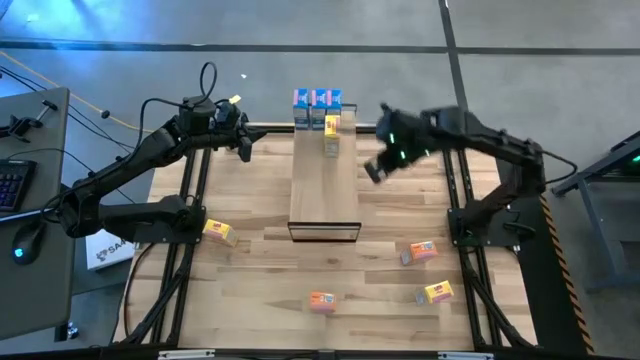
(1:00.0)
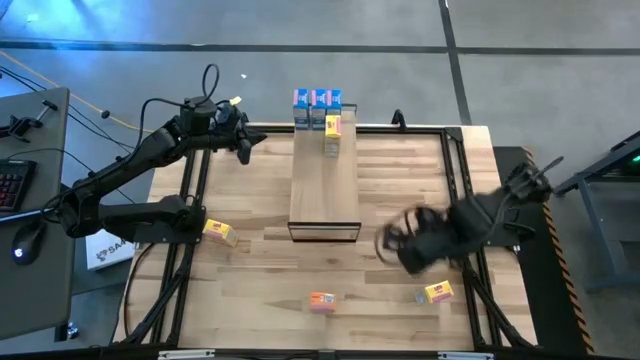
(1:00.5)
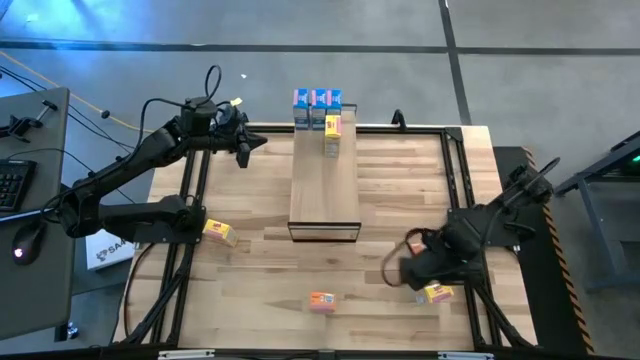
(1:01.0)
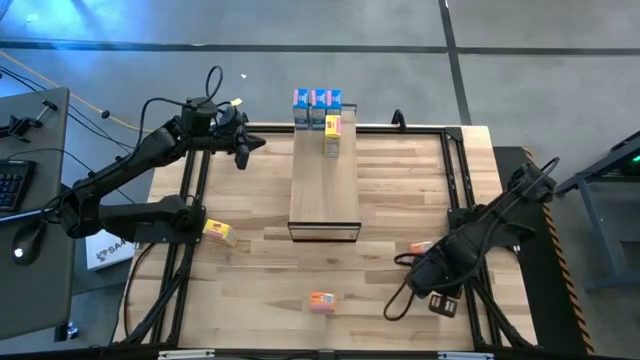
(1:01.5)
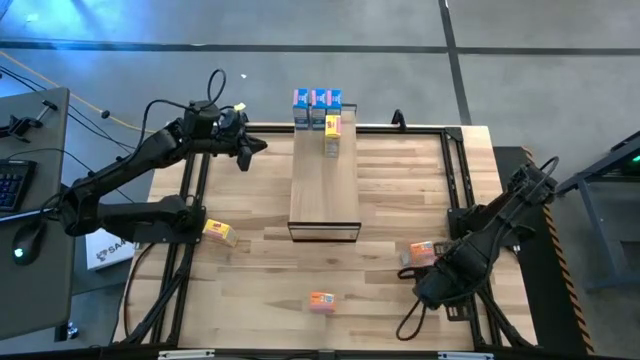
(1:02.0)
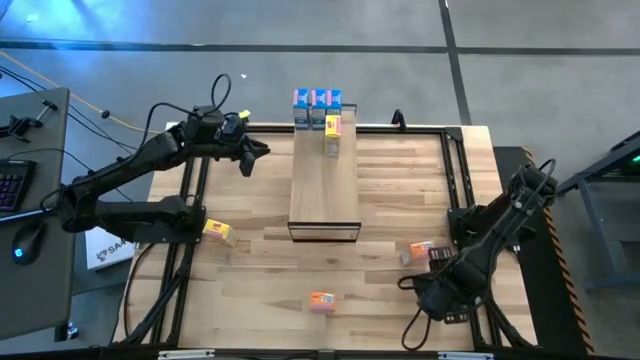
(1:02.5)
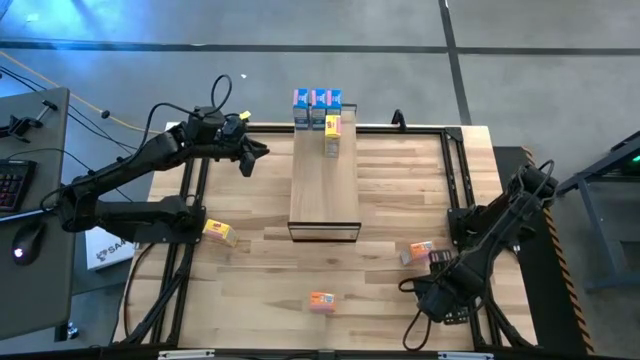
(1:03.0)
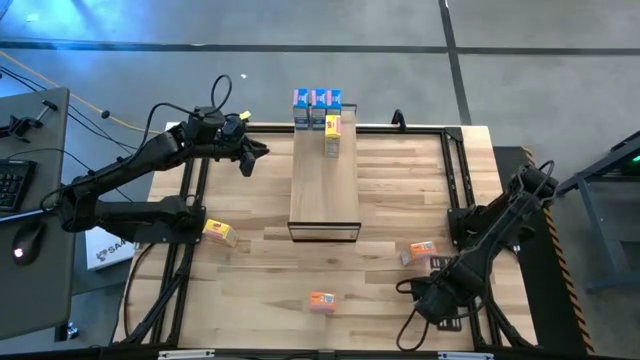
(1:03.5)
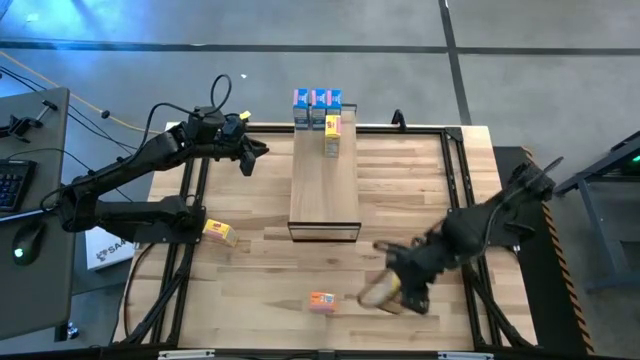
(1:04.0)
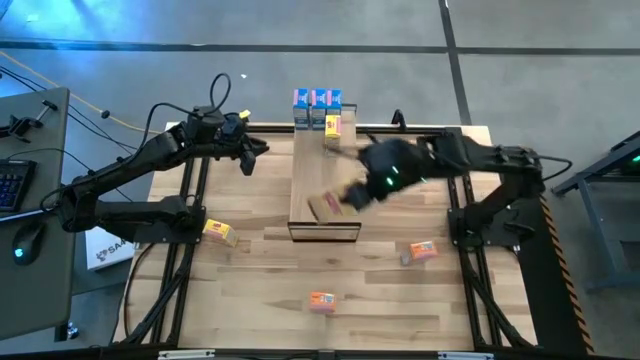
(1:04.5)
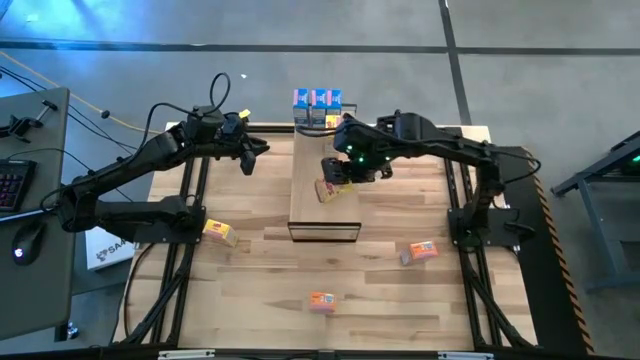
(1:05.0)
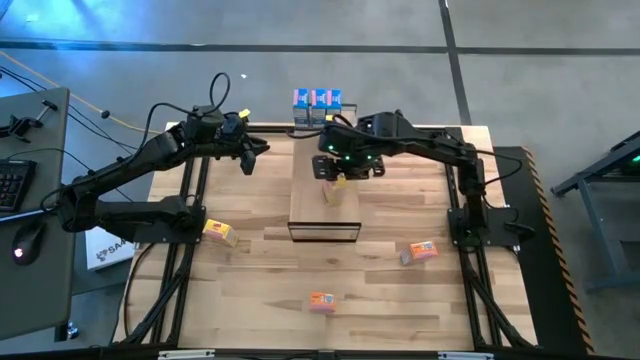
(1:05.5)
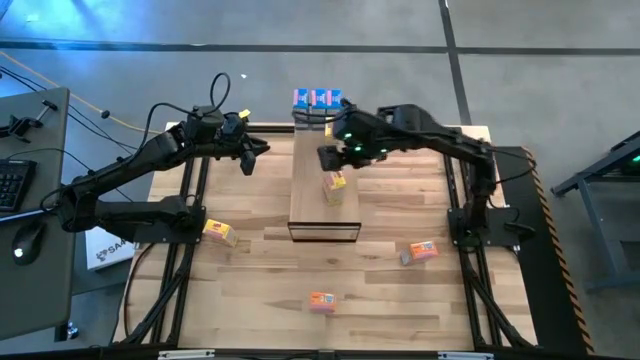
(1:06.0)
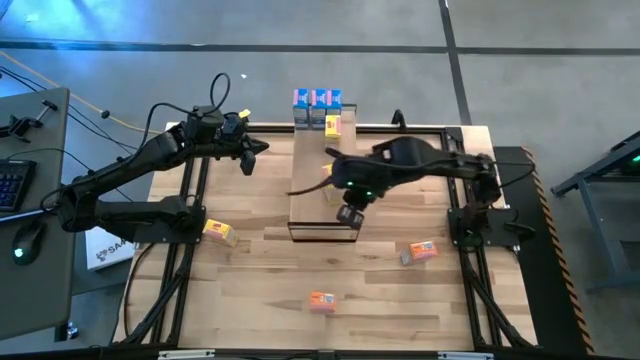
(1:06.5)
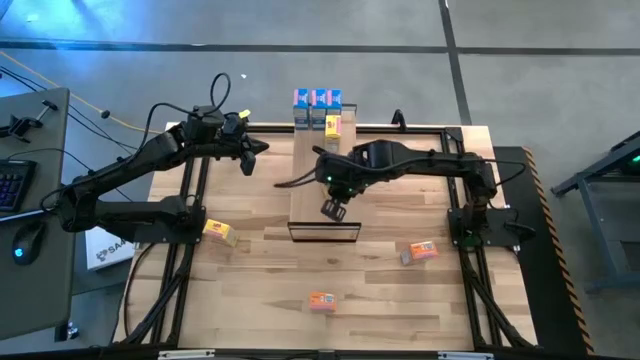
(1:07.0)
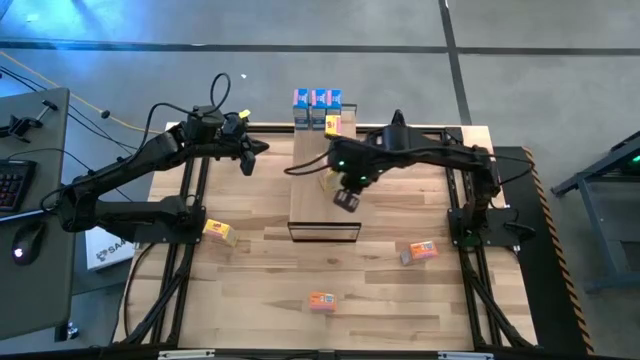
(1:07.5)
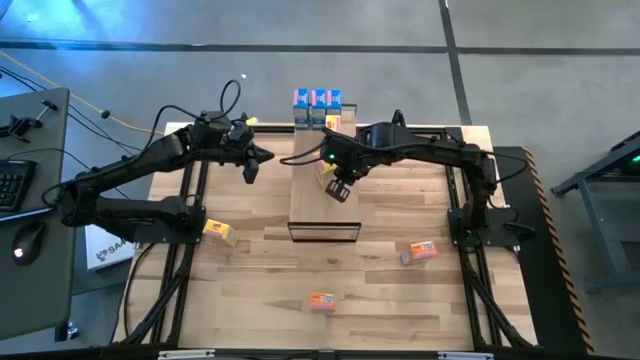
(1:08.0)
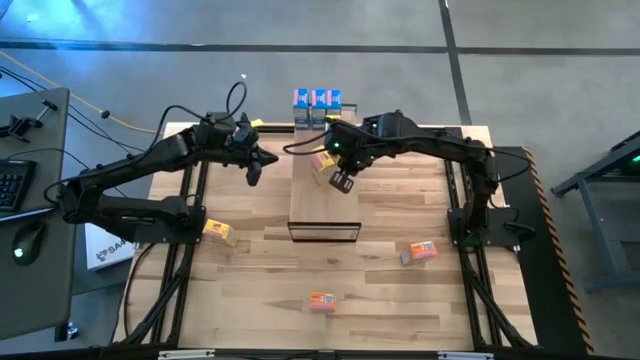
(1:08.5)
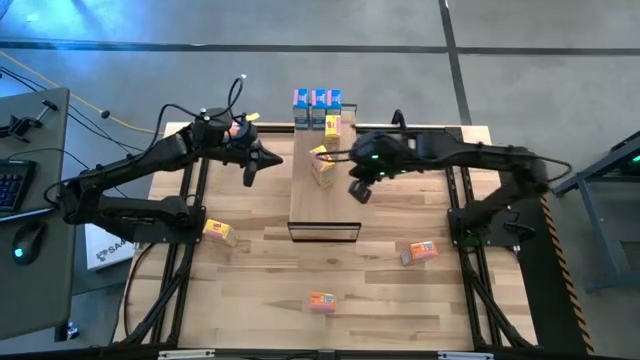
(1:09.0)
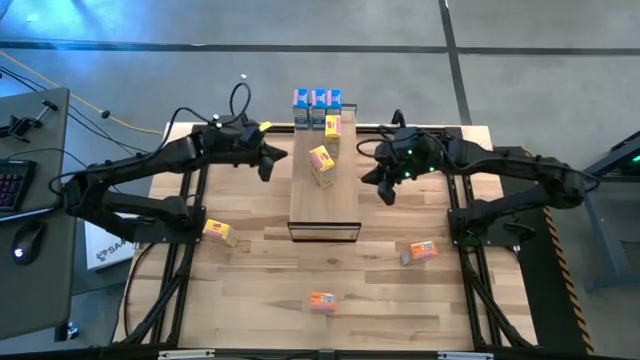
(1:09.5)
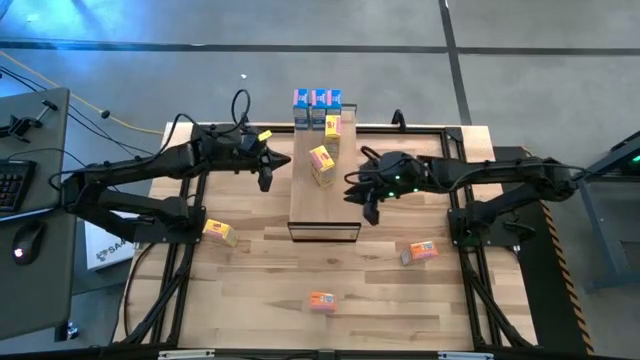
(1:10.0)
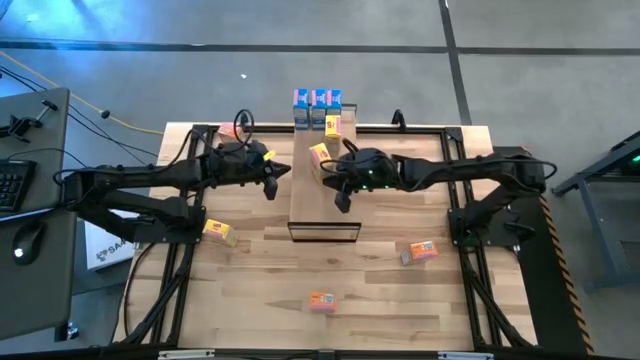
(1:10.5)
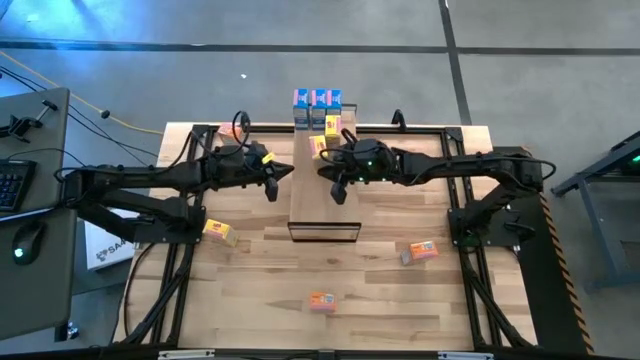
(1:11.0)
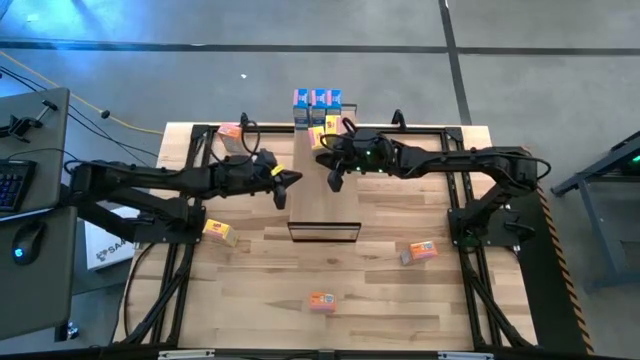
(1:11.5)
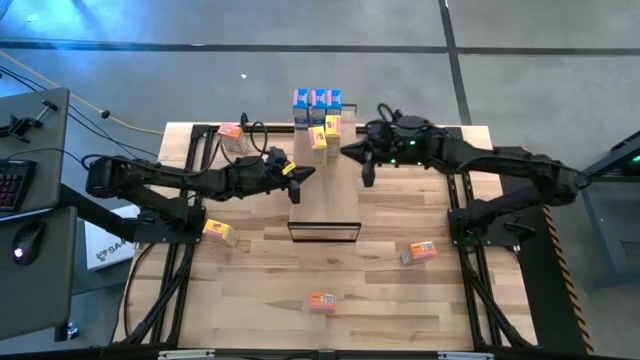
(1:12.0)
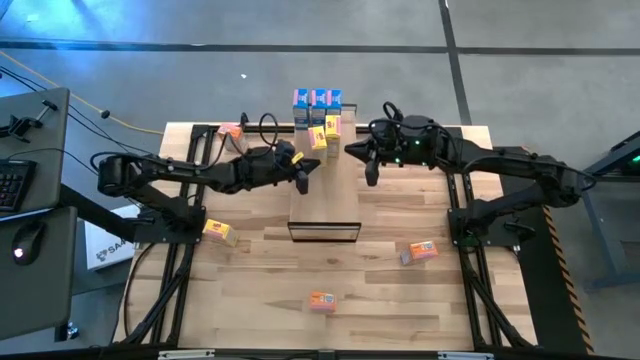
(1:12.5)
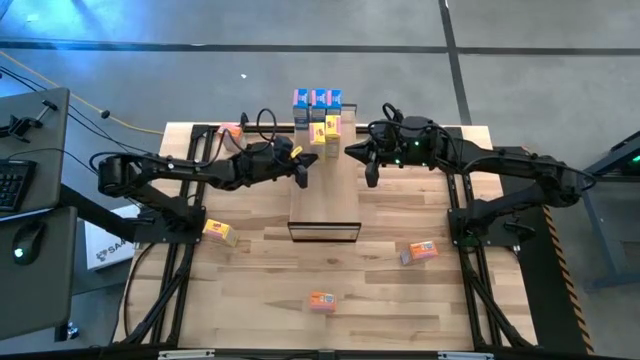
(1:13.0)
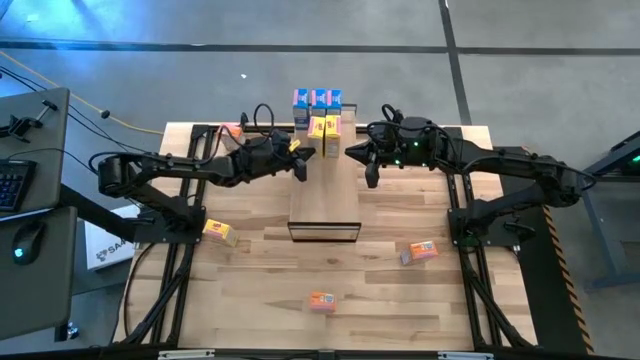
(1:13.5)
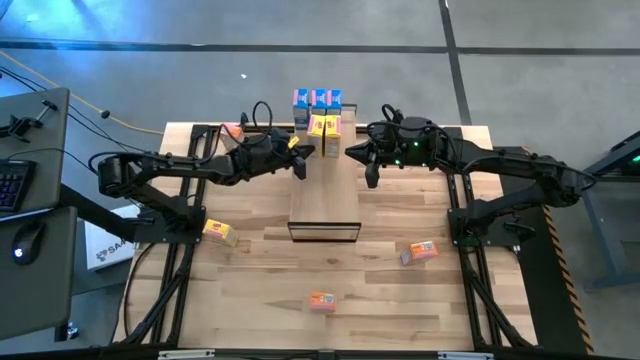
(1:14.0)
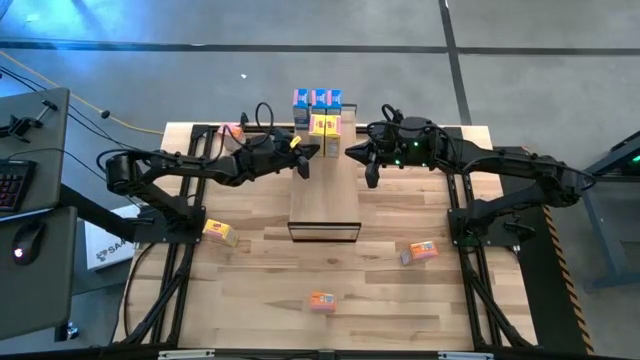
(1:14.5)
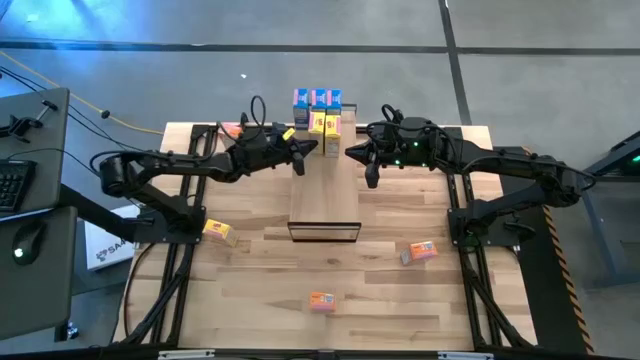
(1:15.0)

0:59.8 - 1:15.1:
Task: Stack cereal on shelf
Put the right yellow cereal box on the shelf aligned with the yellow cereal box

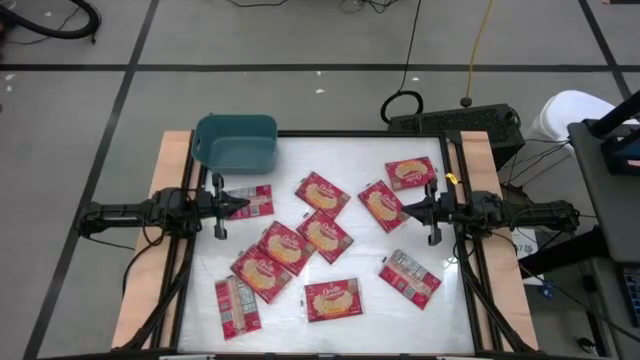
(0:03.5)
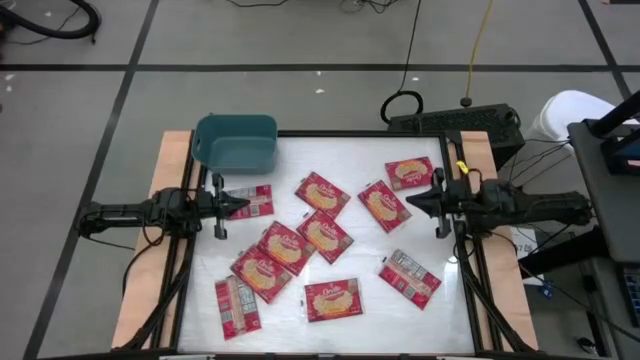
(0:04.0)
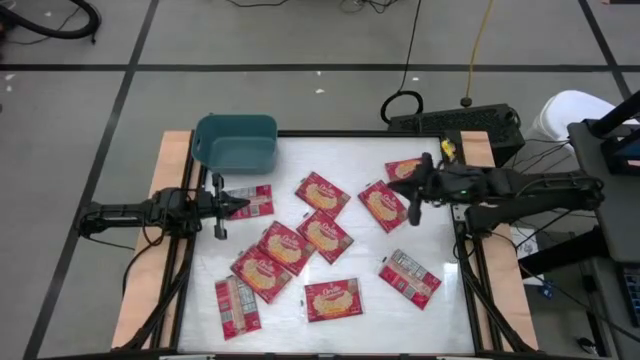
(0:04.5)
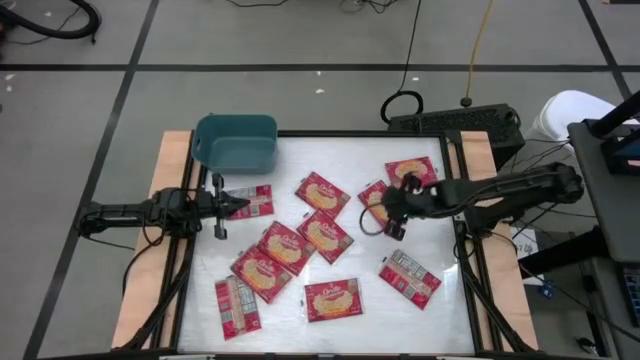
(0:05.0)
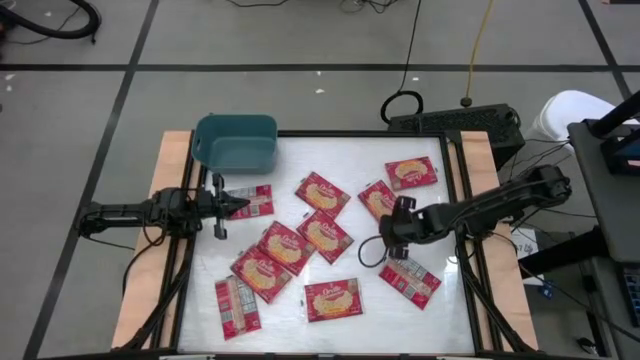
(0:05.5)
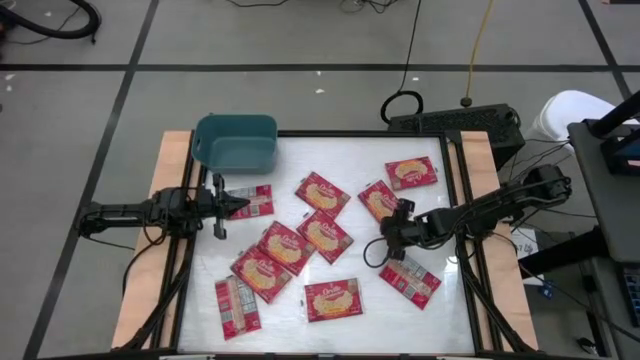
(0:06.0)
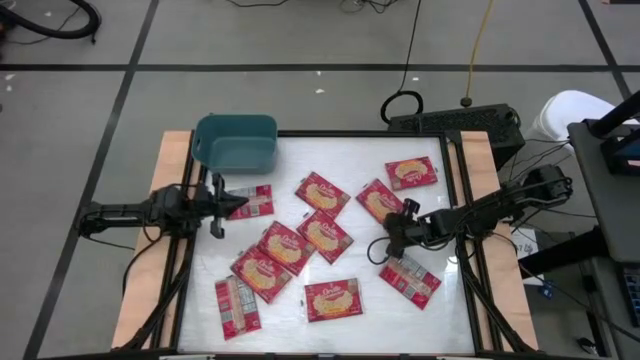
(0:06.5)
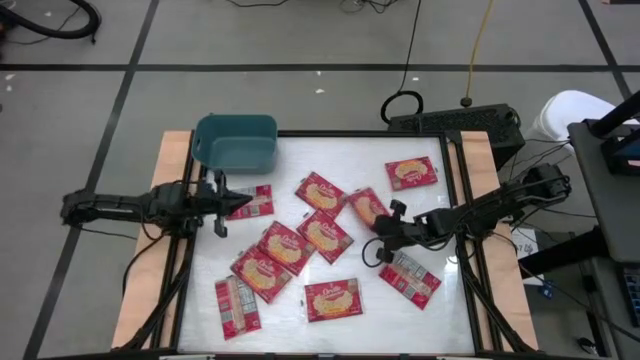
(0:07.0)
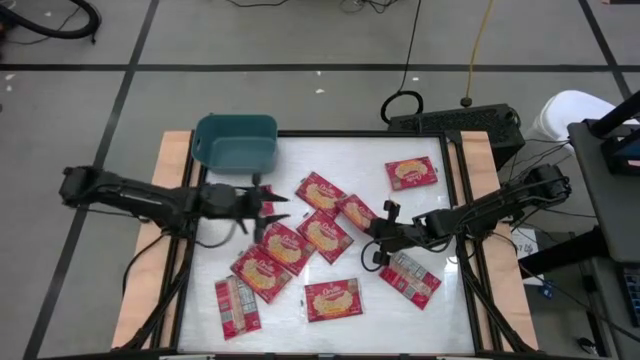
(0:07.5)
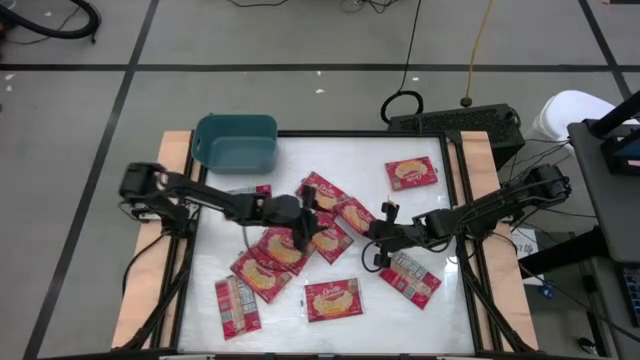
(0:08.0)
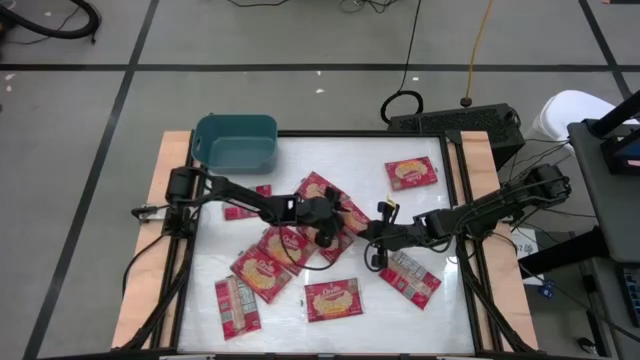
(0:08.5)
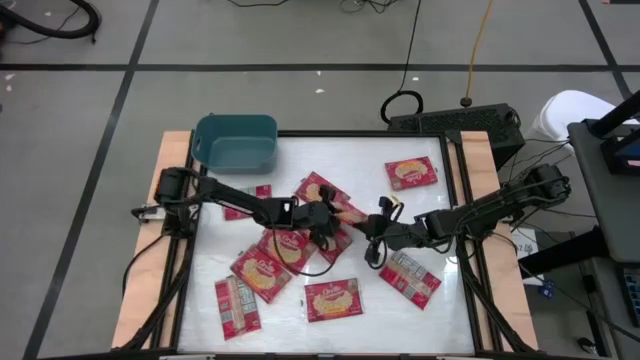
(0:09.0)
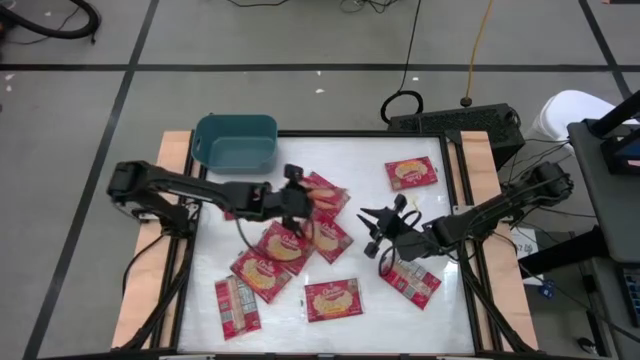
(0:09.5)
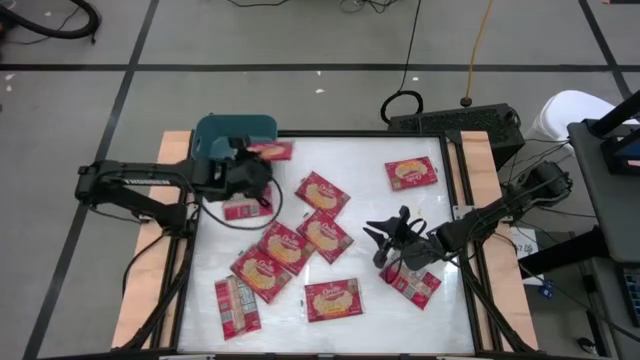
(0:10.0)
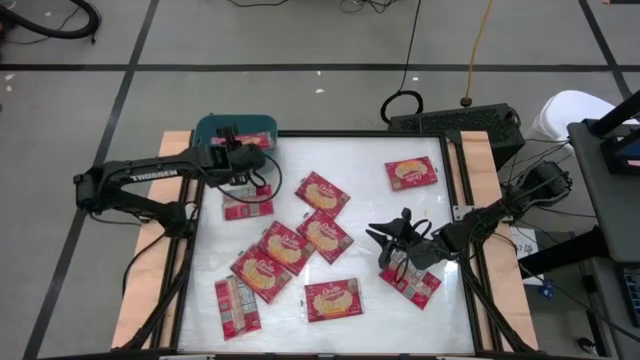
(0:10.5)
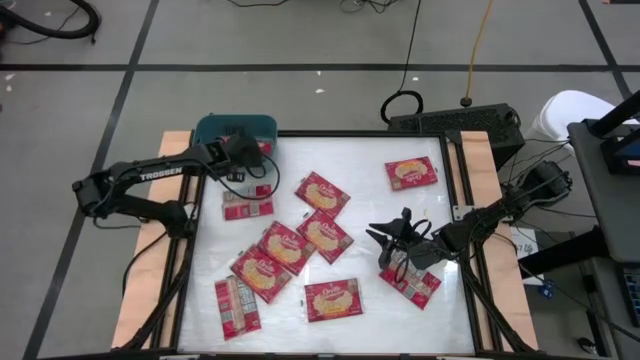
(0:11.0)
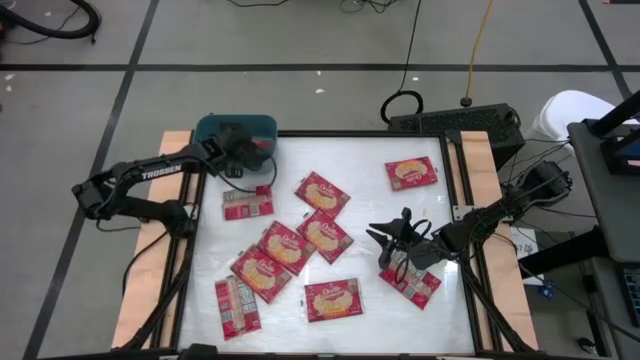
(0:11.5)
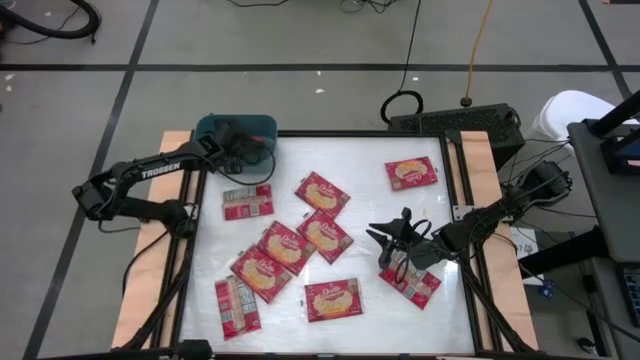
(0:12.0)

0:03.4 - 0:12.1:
Task: Sort popcorn bags into baskets
Put the red popcorn bag into the blue bin
